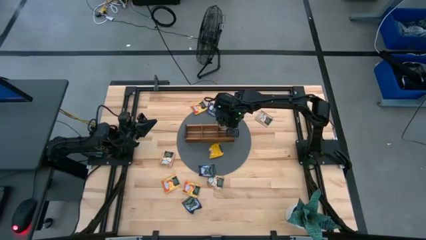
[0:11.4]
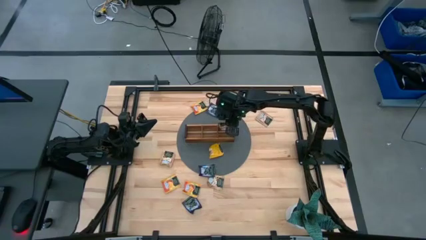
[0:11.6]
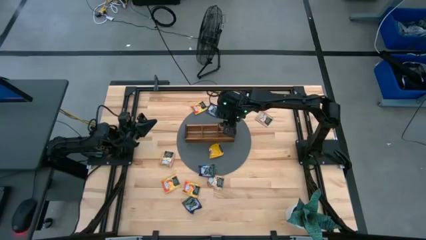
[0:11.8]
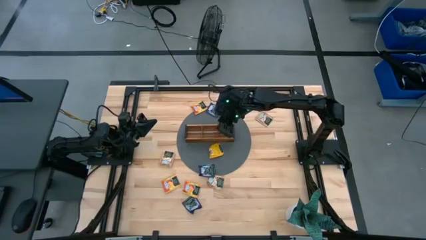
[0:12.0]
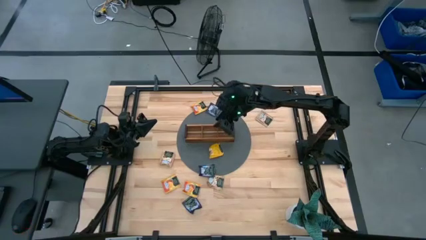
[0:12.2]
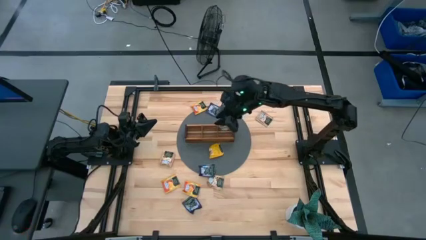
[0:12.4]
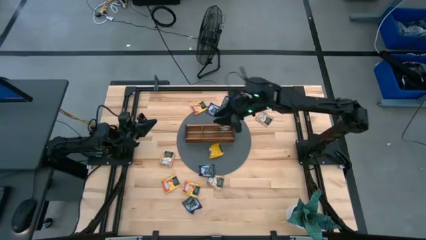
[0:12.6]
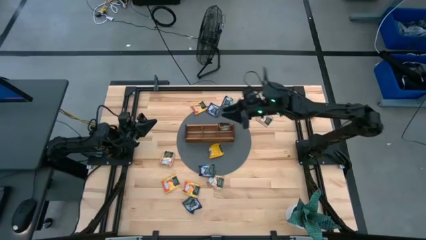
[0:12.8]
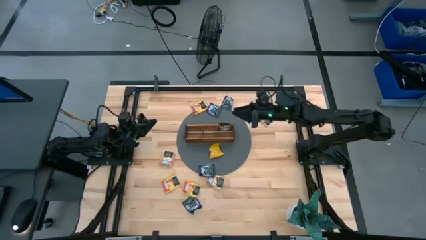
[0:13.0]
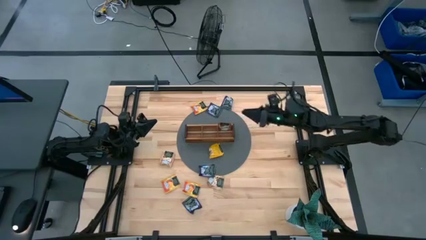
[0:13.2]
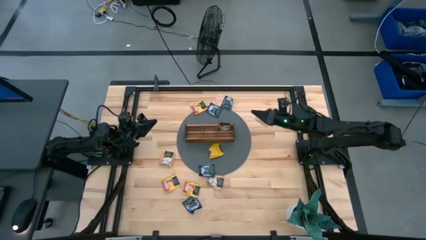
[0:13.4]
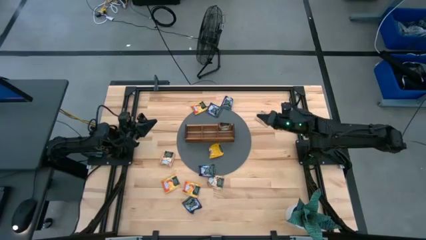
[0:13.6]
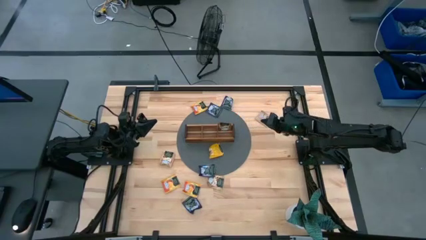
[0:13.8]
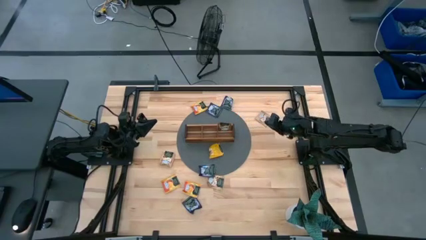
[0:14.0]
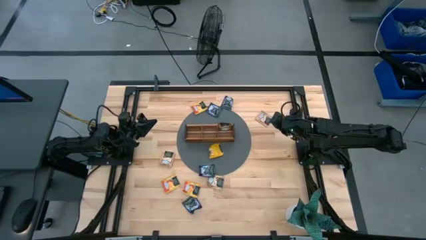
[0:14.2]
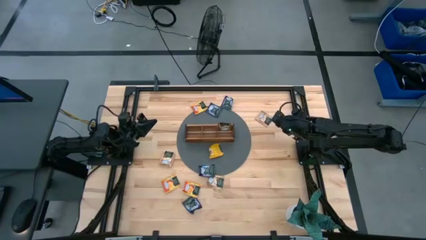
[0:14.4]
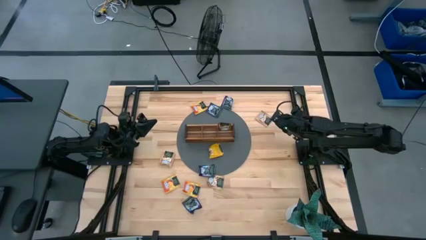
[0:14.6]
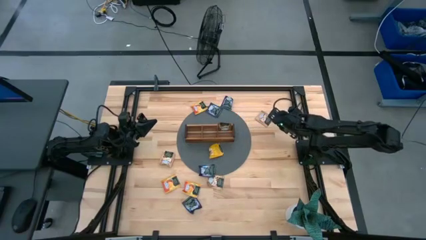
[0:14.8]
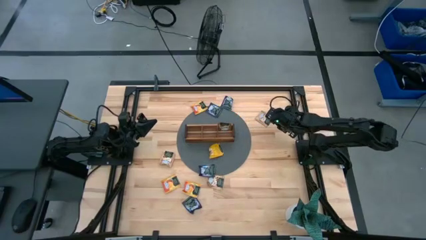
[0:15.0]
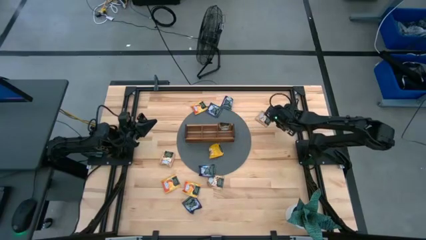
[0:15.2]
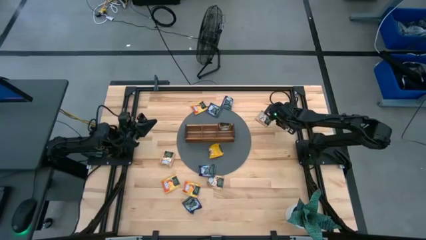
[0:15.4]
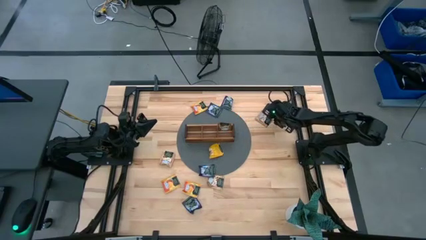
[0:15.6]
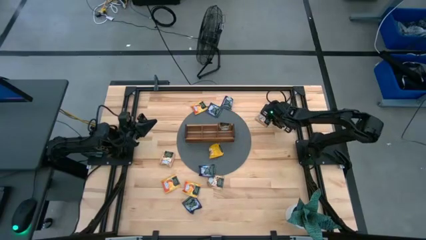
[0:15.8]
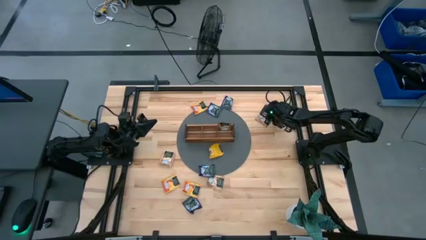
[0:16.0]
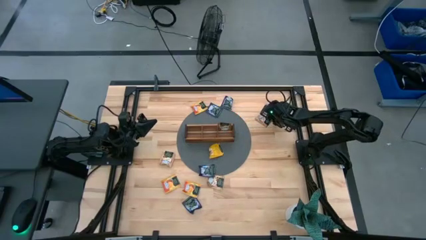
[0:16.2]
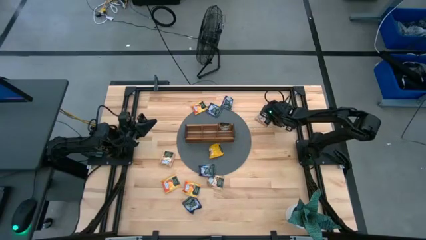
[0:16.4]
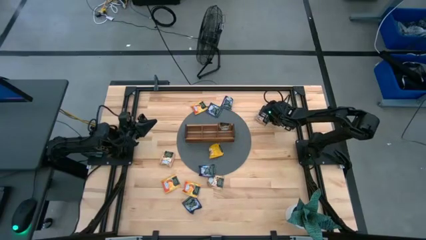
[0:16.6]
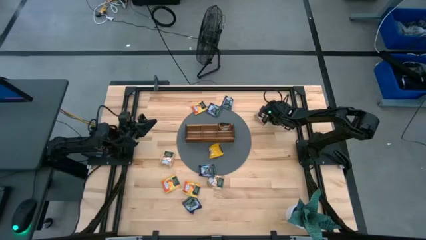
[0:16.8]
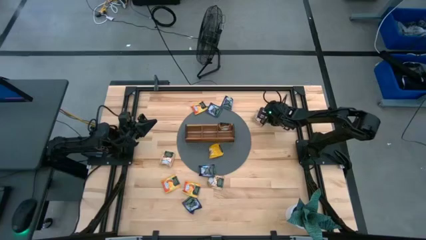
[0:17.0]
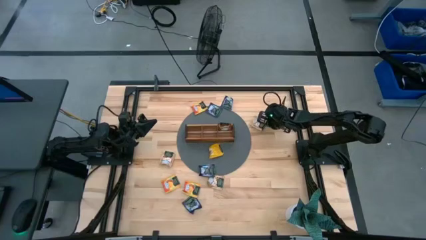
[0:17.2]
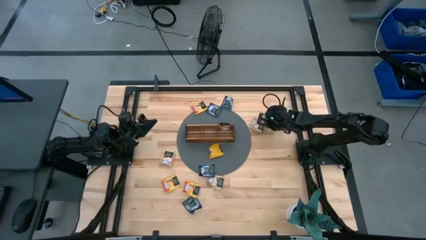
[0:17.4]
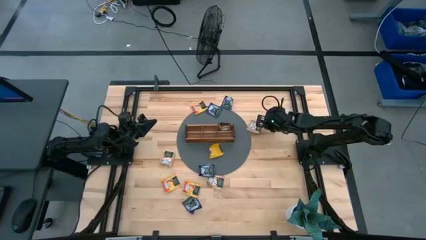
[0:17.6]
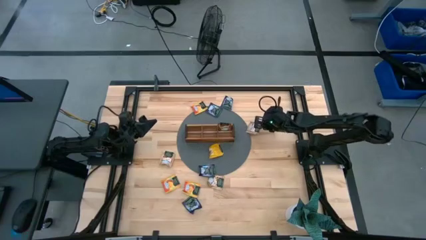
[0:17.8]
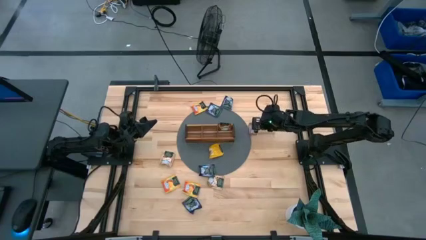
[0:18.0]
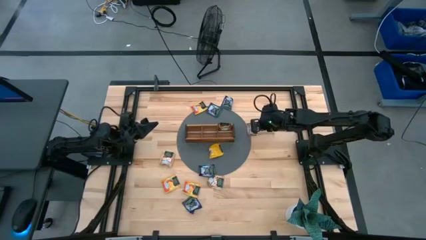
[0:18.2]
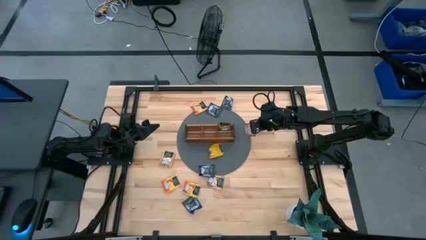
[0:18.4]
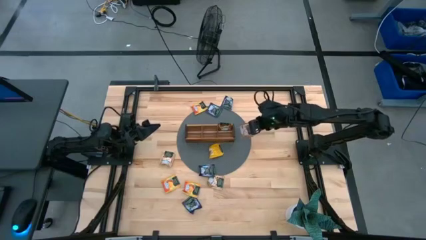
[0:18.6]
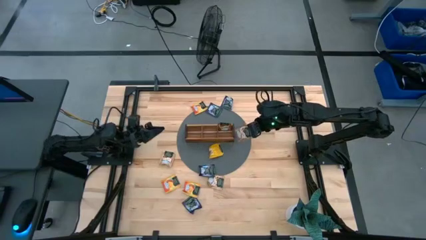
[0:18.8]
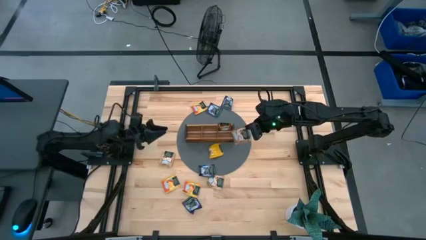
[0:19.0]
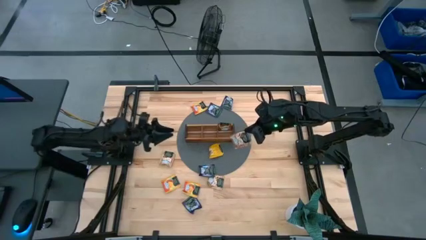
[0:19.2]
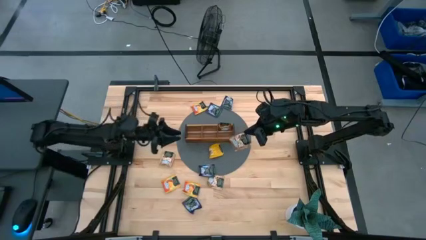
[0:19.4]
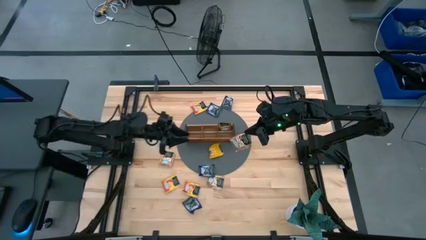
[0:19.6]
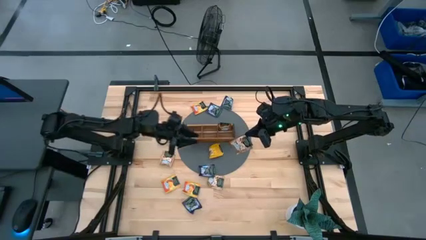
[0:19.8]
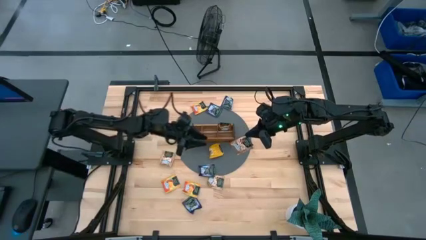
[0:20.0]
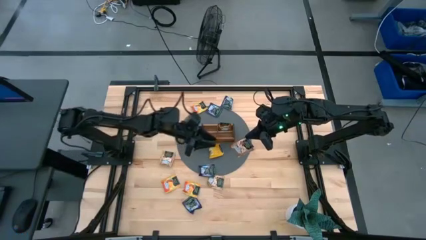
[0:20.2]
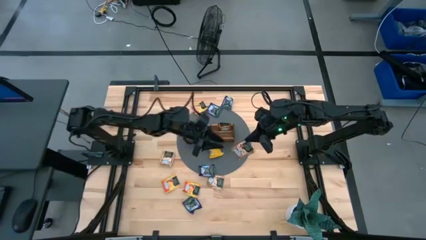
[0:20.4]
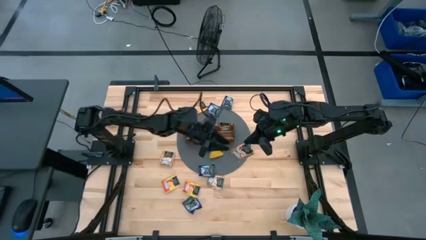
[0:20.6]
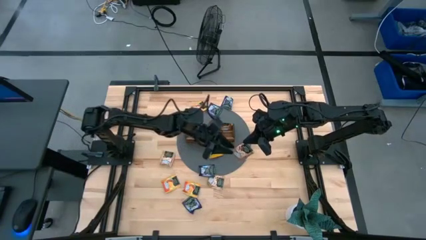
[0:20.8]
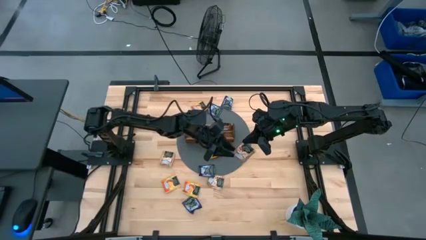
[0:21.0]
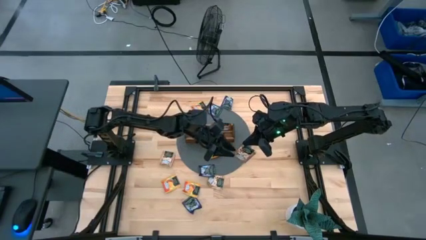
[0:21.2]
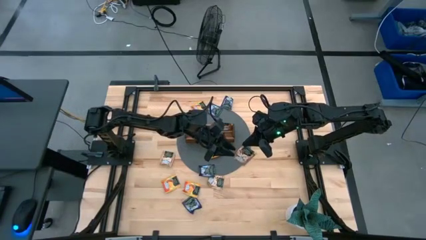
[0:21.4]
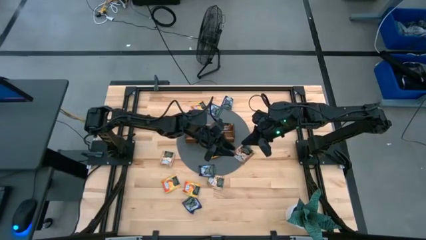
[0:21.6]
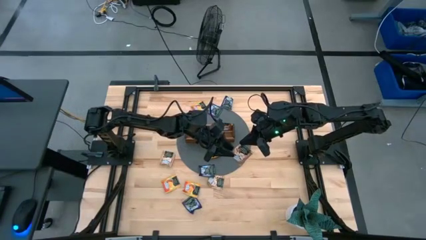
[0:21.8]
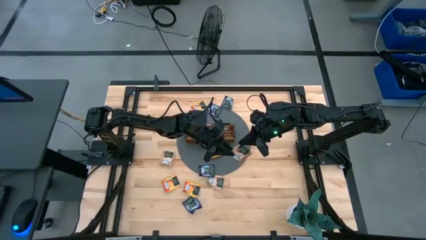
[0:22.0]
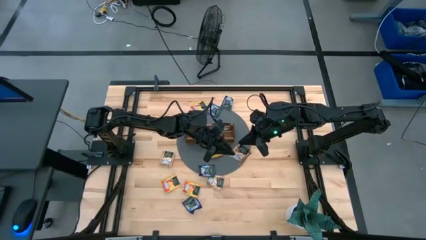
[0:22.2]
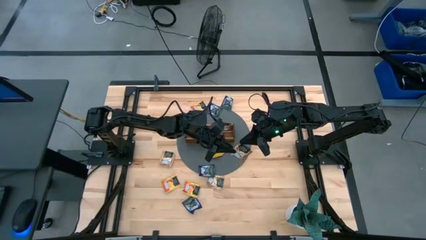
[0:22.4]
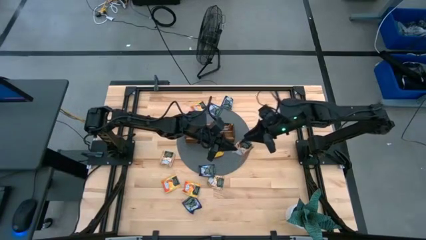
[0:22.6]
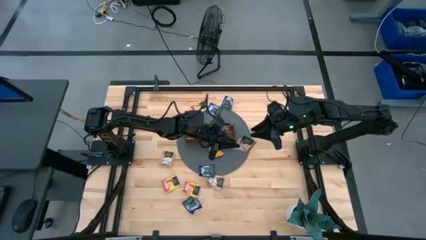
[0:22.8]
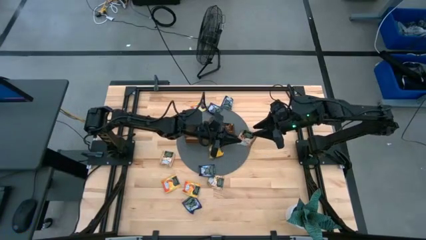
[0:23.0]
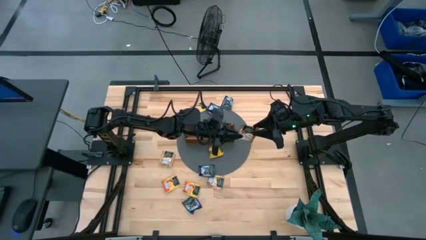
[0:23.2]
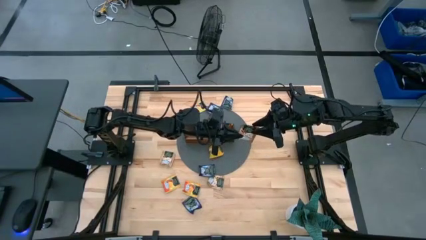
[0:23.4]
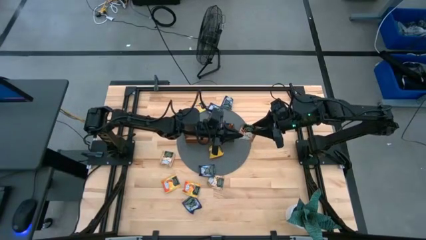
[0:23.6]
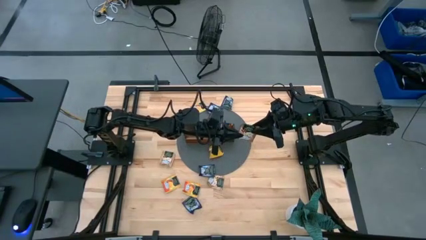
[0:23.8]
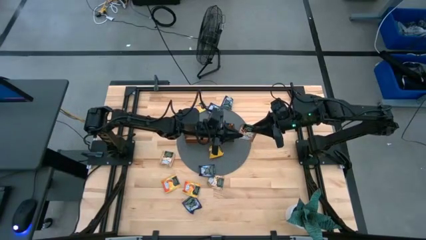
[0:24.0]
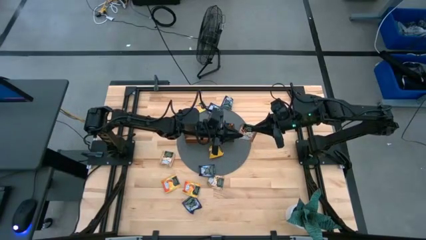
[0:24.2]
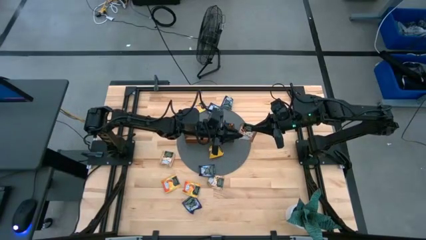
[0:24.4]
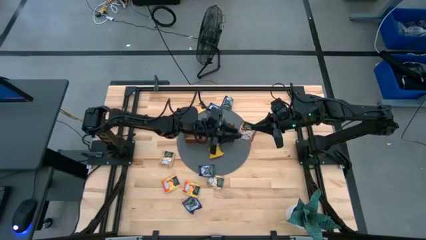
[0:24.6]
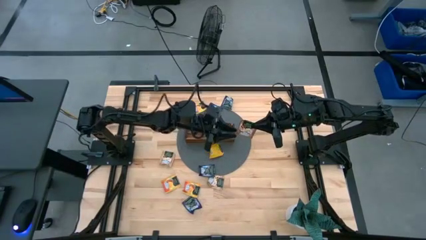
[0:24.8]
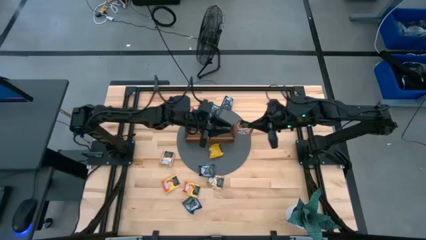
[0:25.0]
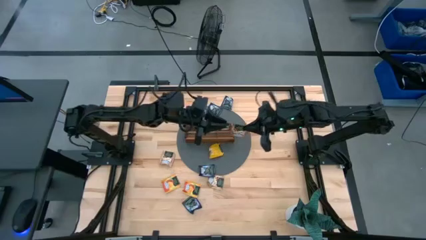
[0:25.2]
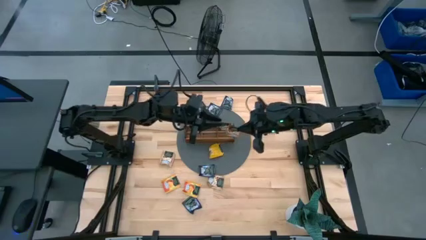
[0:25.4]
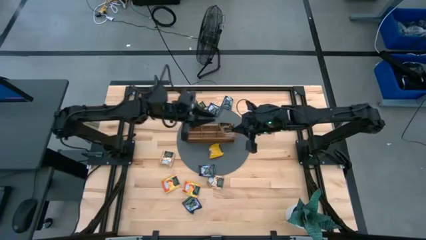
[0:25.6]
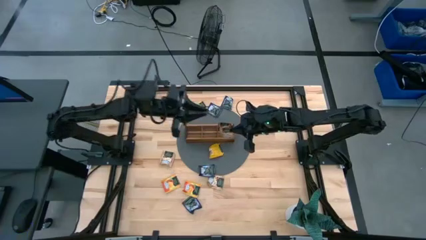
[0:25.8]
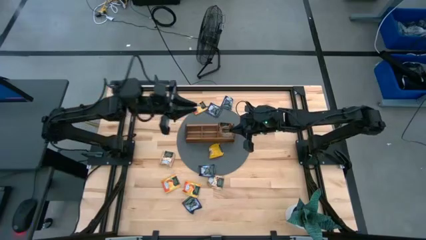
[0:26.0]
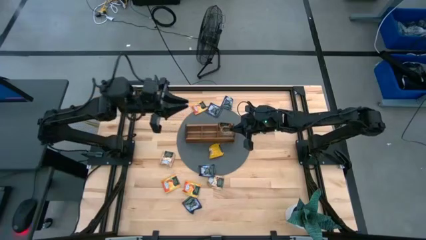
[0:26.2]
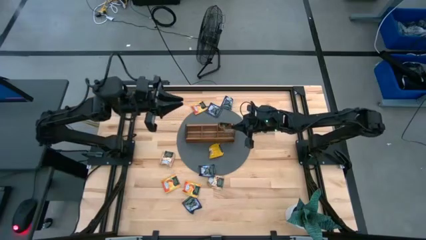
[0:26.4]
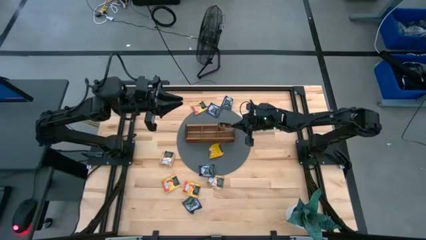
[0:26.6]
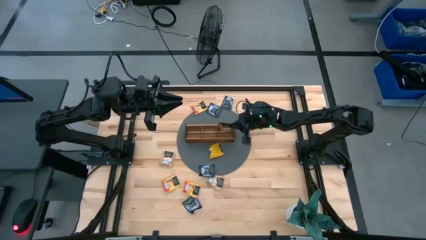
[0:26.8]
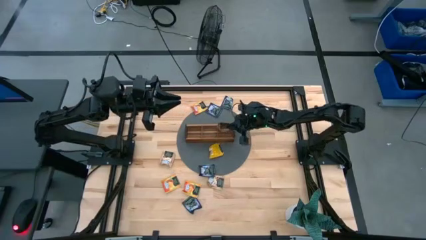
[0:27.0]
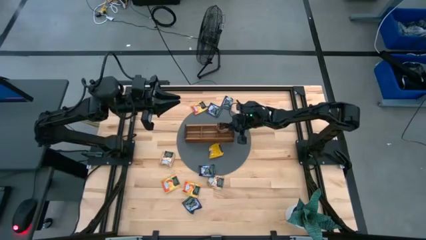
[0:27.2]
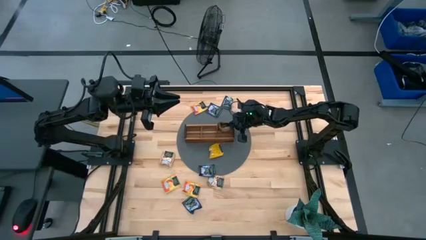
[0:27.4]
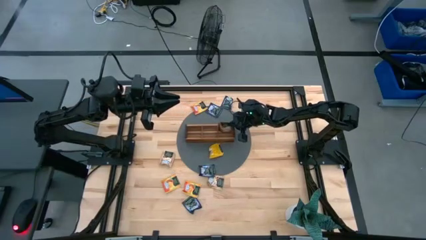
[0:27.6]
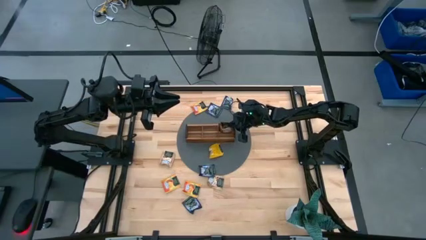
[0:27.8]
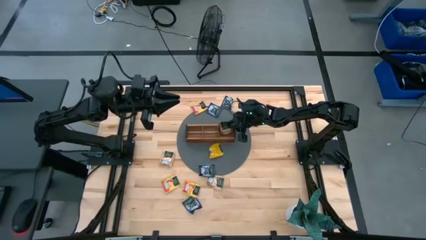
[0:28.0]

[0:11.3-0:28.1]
Task: Pick & Place Tea
Put the brown tea bag into the right section of the wooden organizer
